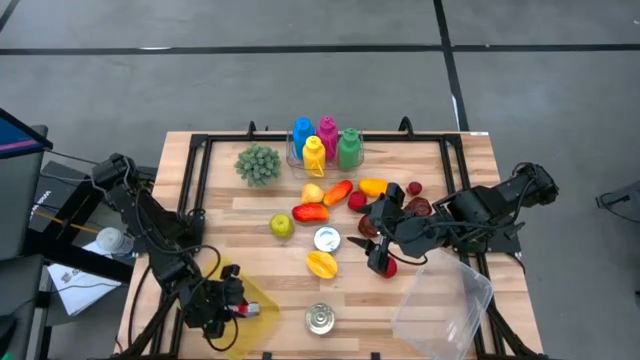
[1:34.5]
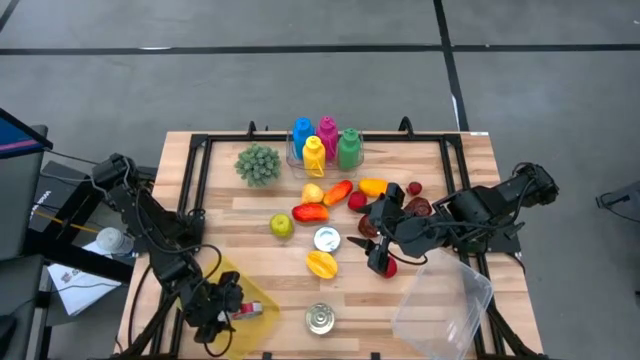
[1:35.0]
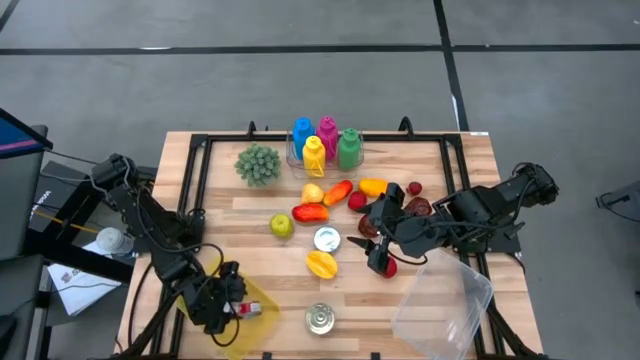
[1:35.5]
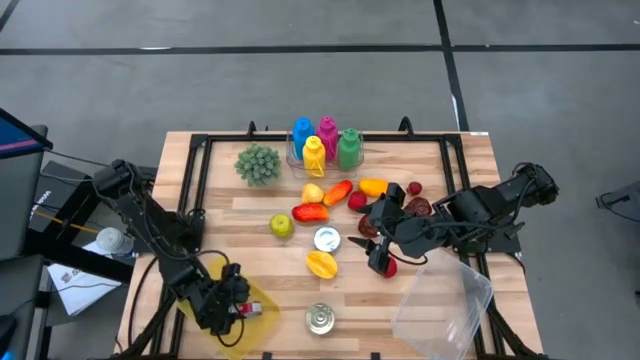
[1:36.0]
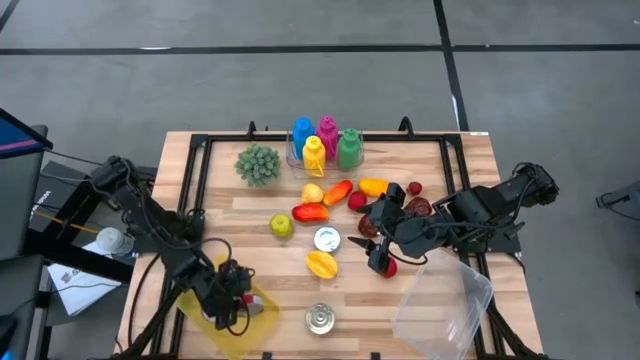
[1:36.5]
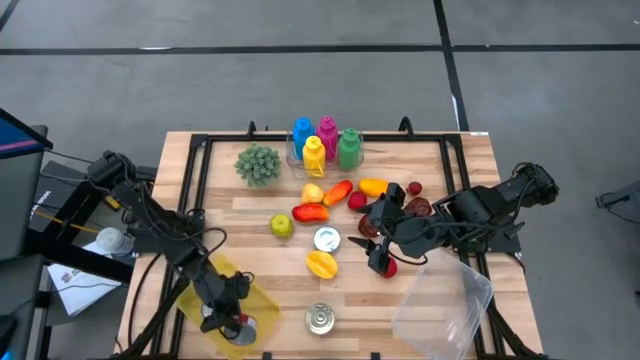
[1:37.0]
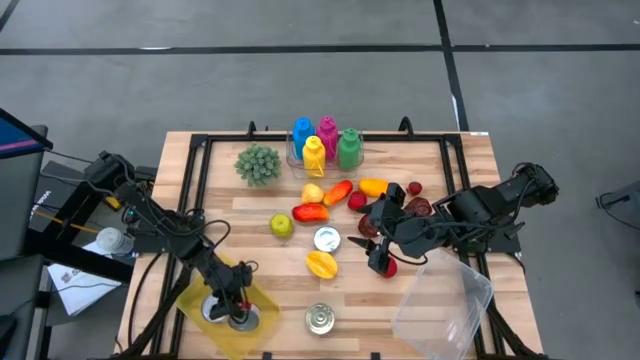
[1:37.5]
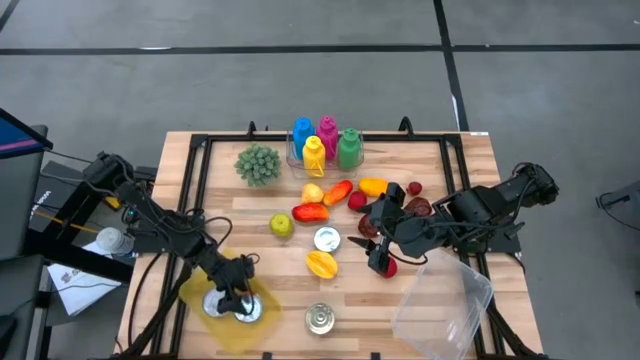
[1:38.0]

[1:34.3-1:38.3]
Task: Pick & Place Food Item
Put the red tuna can into the yellow bin

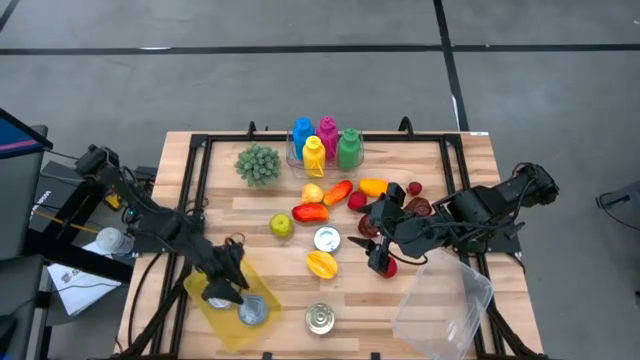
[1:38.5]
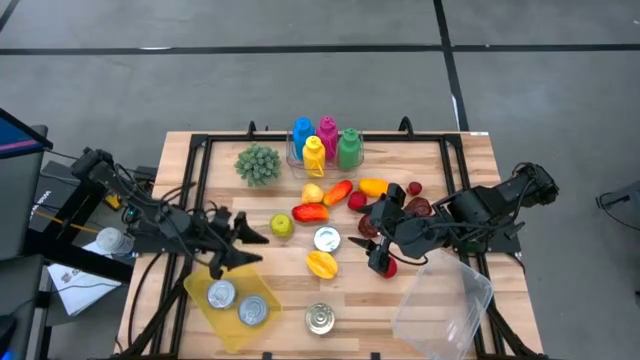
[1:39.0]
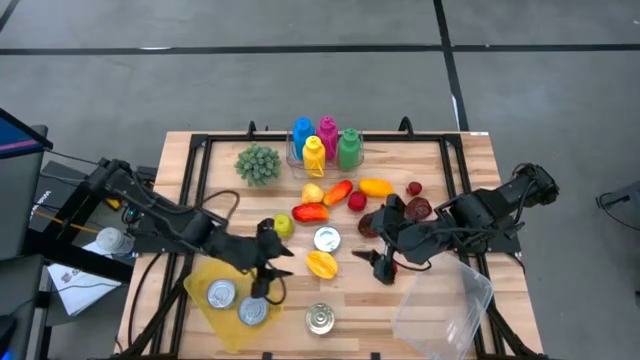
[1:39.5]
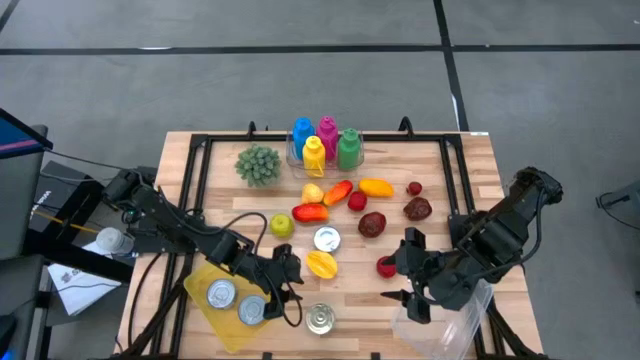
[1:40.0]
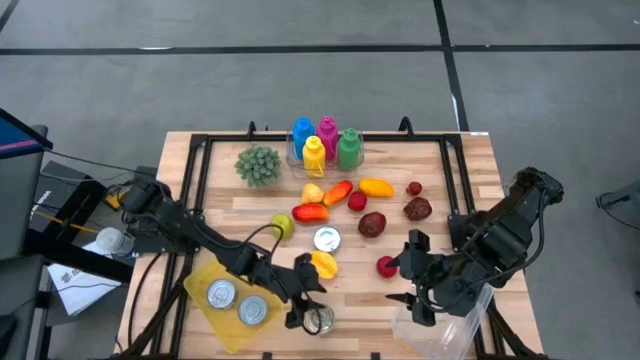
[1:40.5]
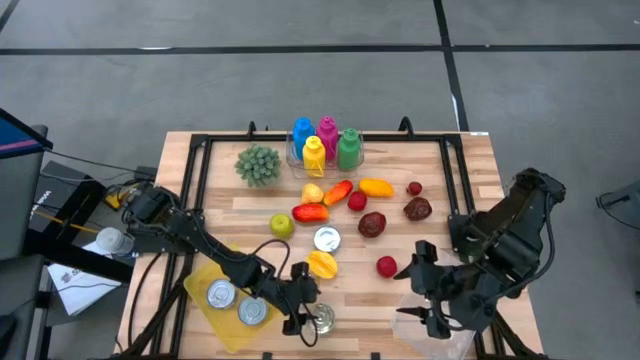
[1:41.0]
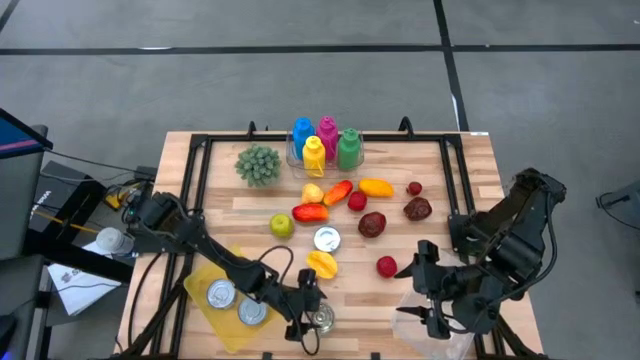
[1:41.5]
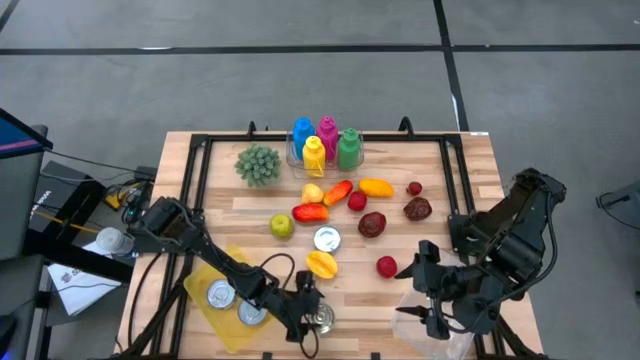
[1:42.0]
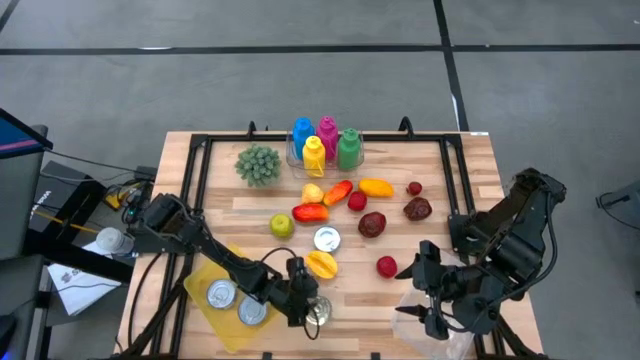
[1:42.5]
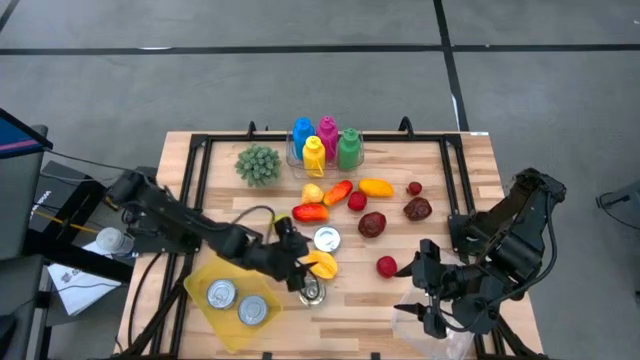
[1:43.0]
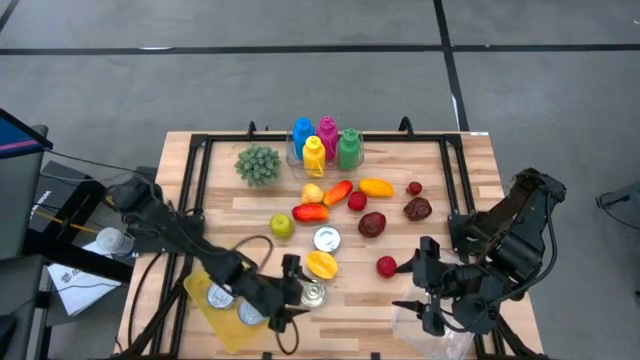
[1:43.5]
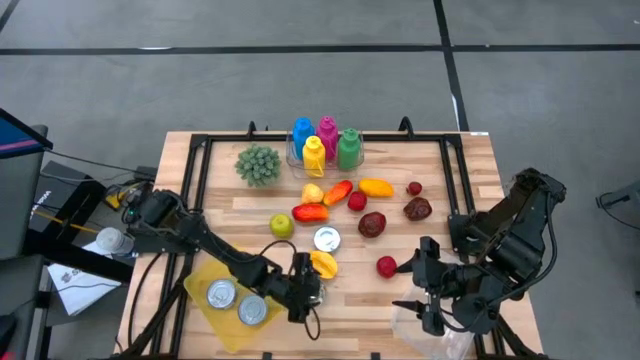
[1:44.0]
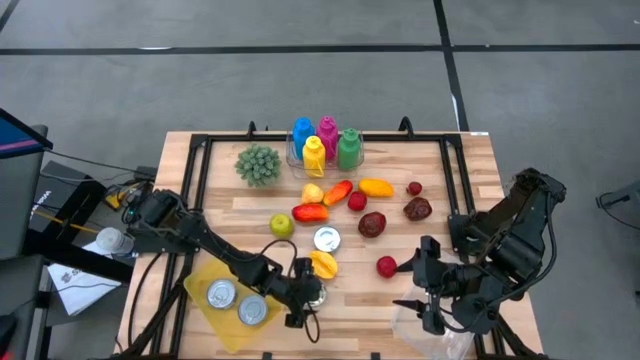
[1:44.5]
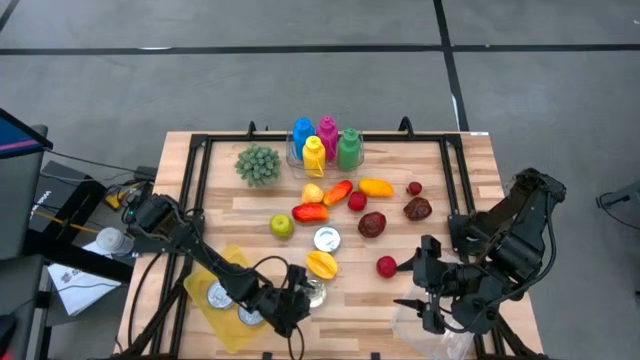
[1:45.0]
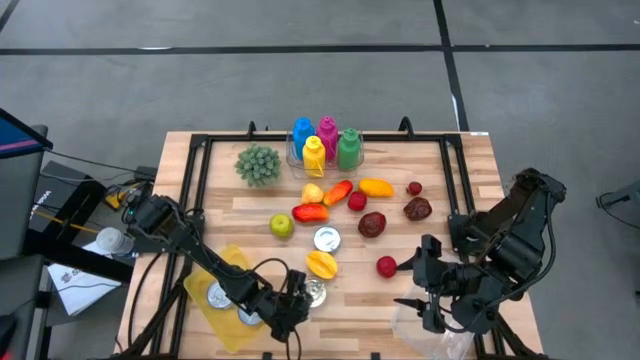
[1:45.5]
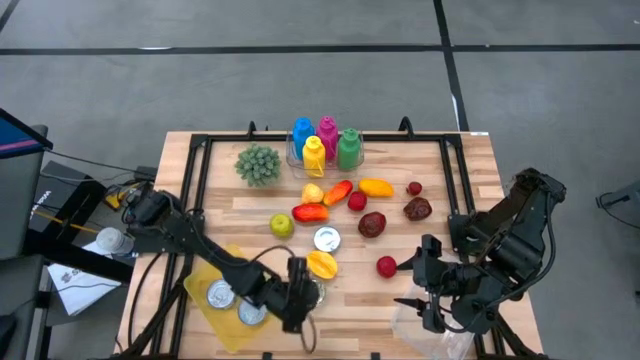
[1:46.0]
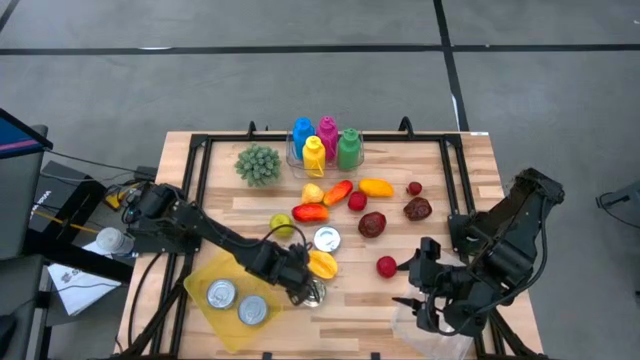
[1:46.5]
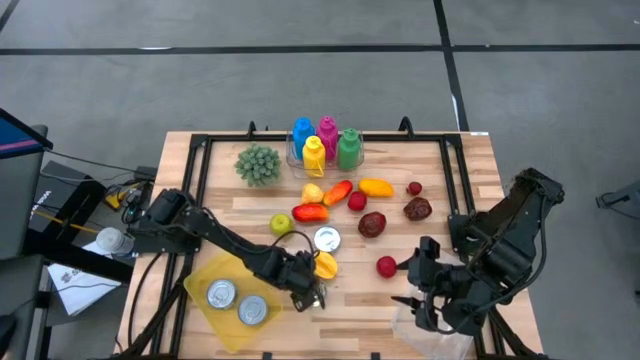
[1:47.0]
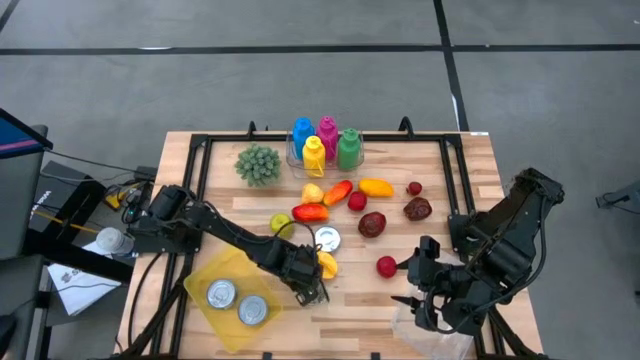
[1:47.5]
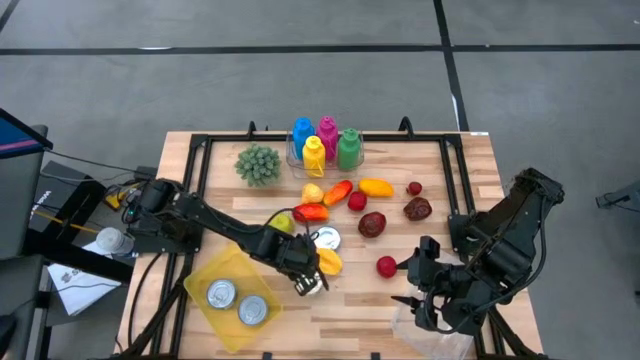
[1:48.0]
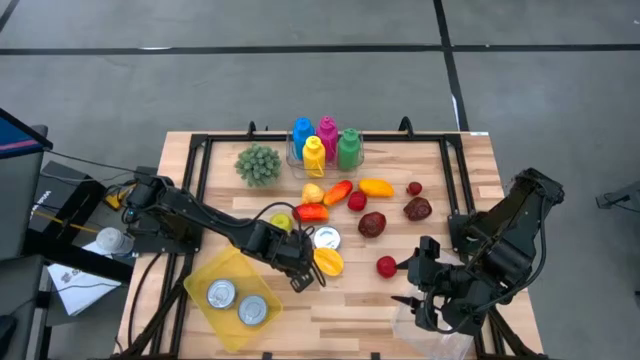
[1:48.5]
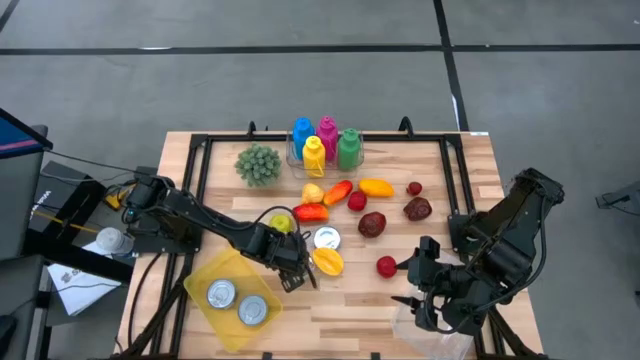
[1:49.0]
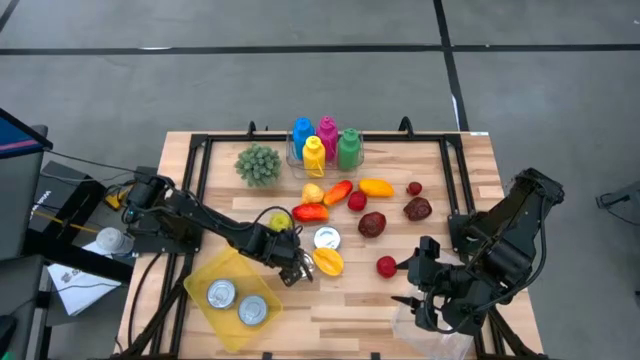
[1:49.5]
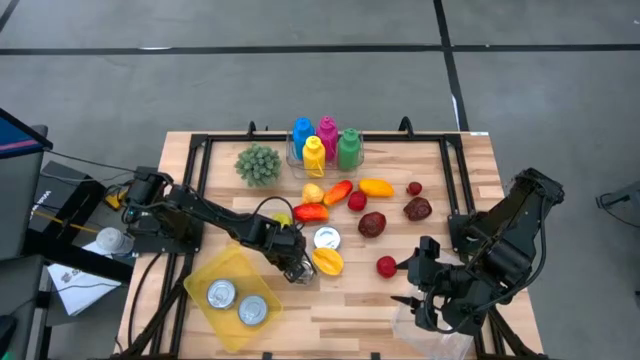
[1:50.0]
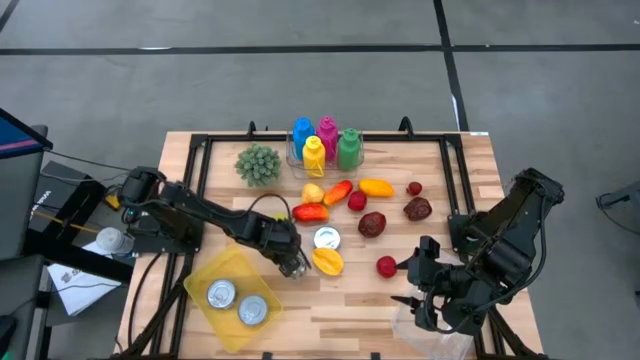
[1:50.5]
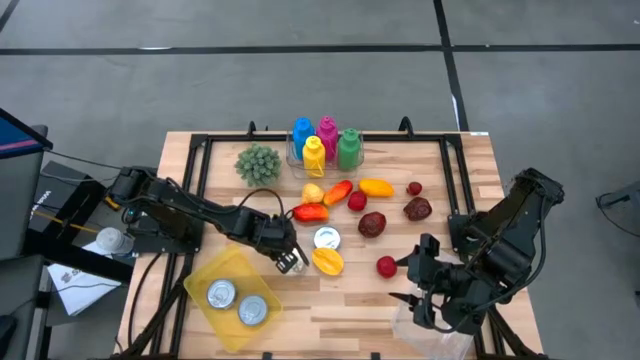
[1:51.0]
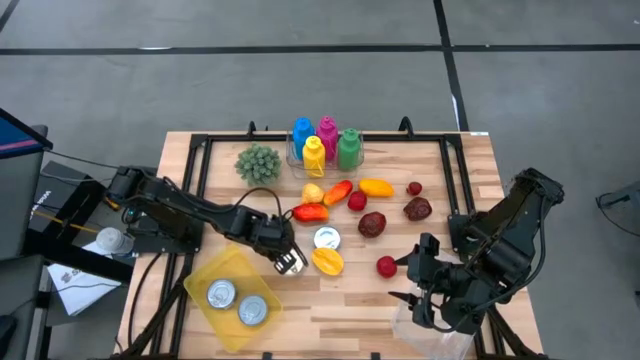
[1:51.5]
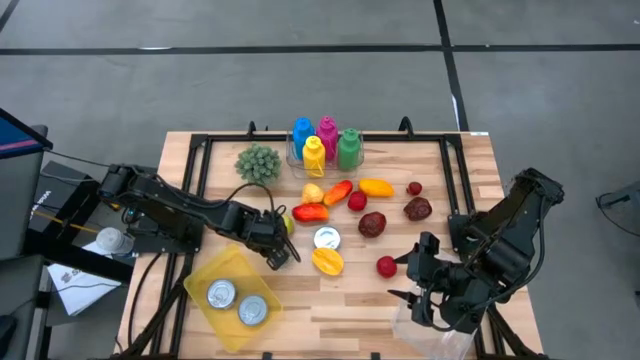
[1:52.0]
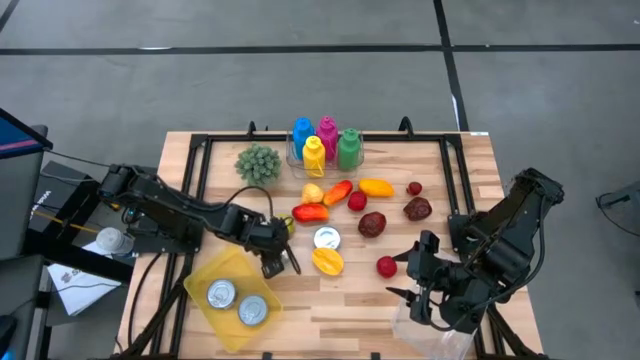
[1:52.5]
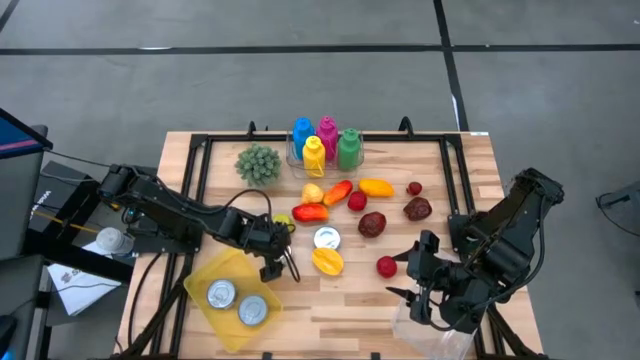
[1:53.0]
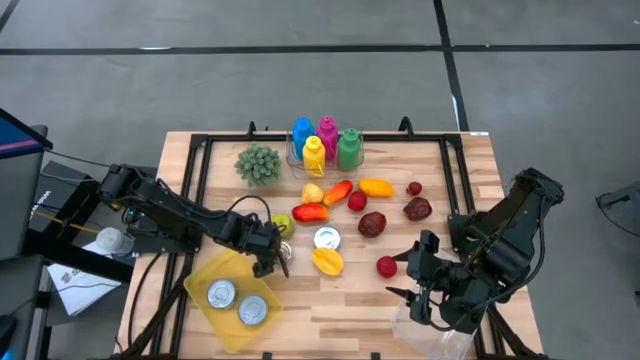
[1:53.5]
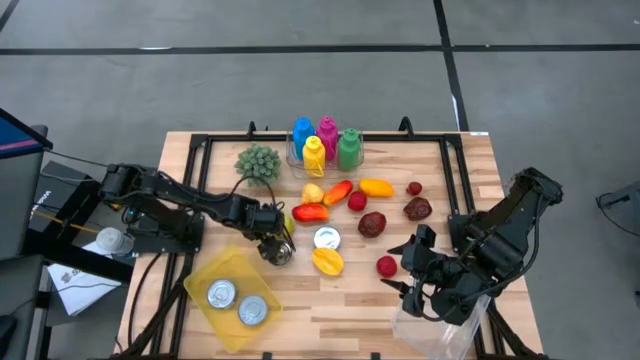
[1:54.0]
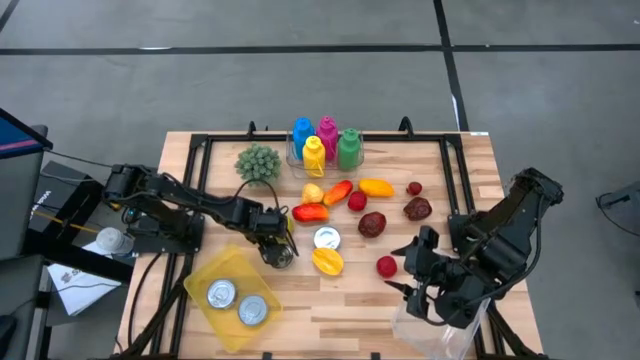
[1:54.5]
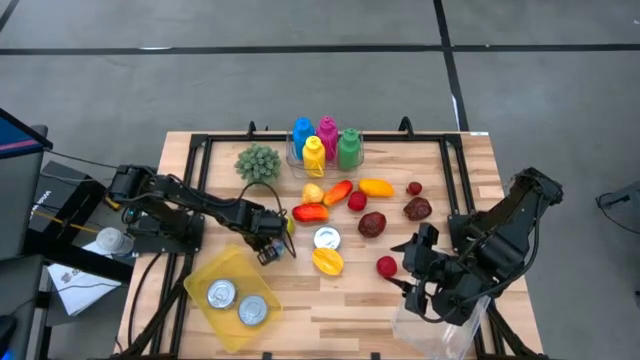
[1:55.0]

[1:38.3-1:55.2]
Put the blue and pink tuna can into the yellow bin

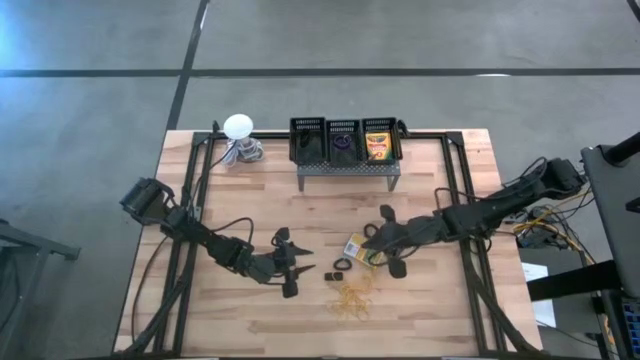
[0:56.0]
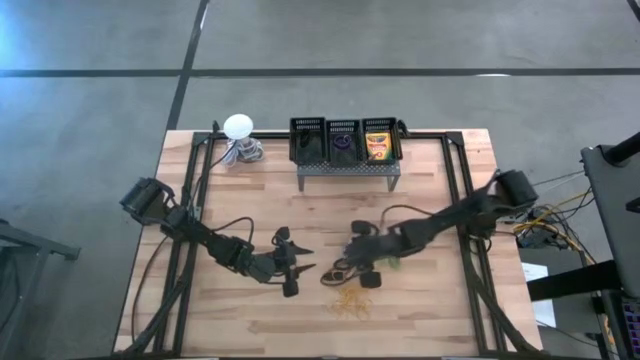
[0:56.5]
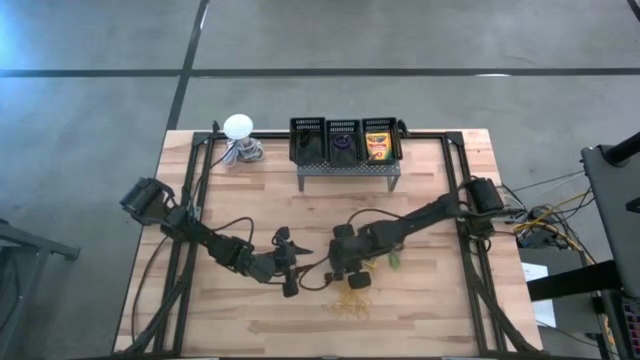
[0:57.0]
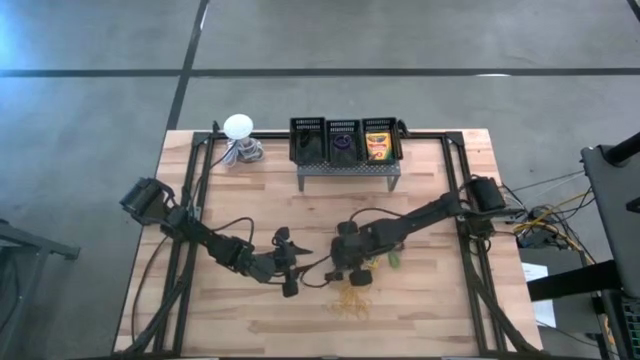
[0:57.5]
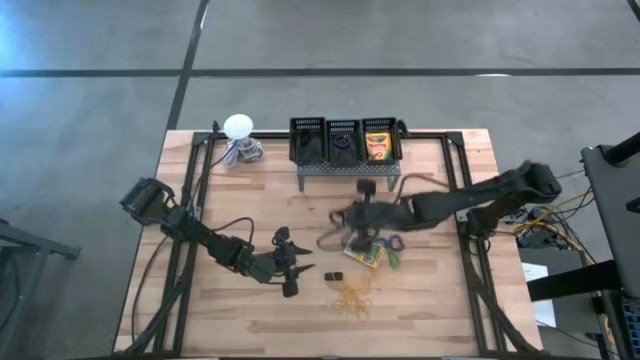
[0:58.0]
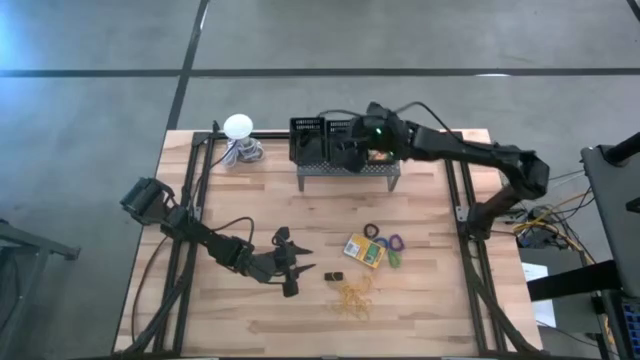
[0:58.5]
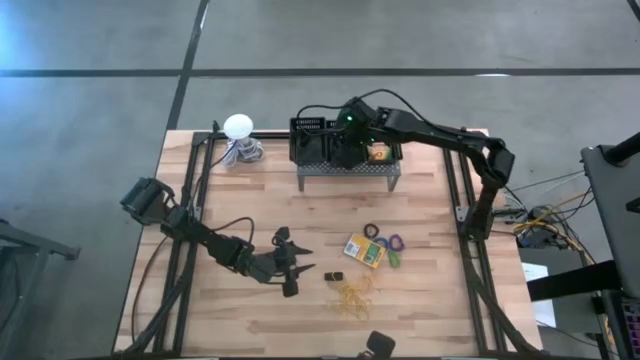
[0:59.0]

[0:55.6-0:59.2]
Task: Pick & Place Office Desk Supplies
Put the black keychain into the middle black bin on the shelf
